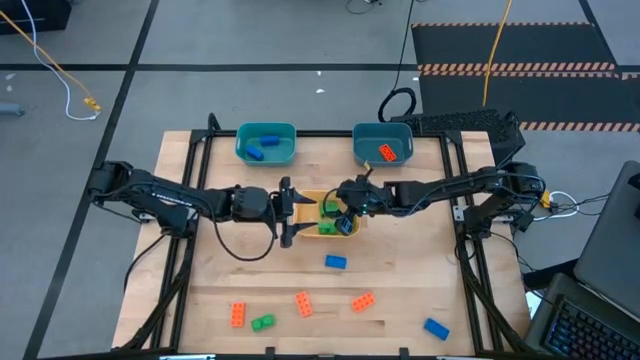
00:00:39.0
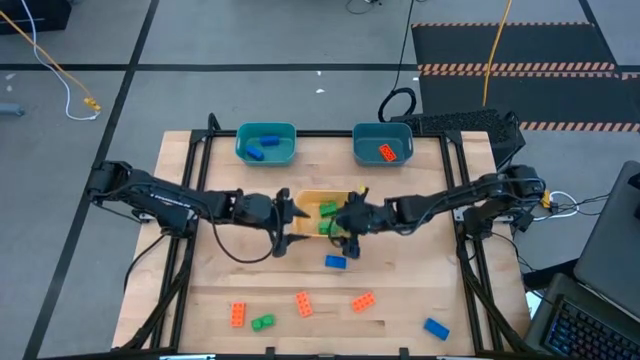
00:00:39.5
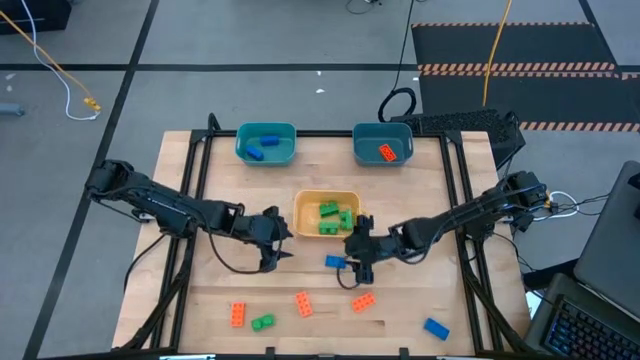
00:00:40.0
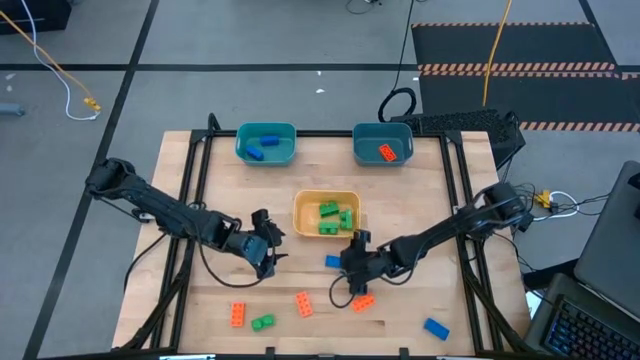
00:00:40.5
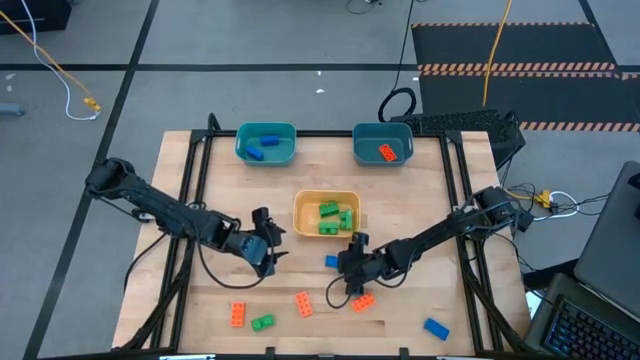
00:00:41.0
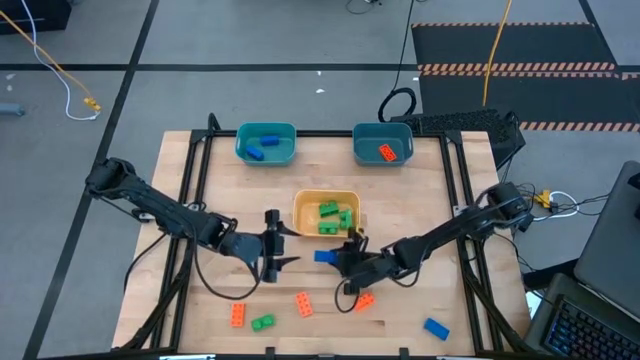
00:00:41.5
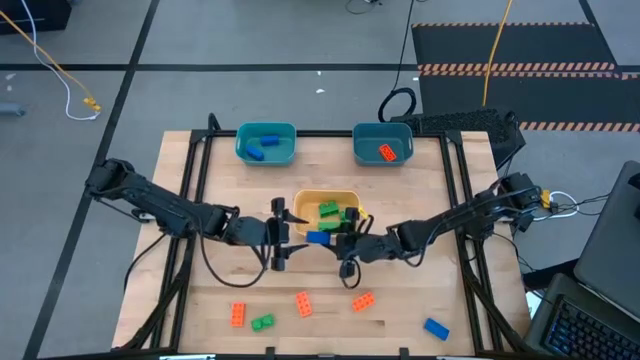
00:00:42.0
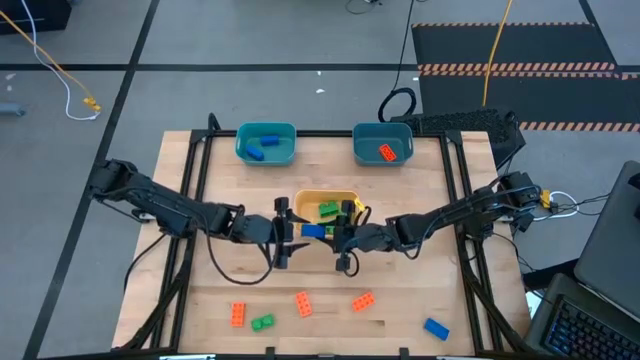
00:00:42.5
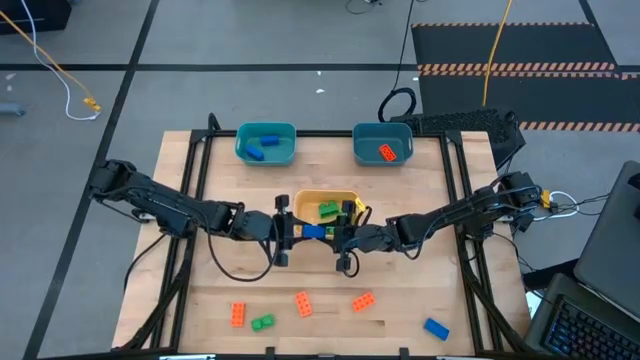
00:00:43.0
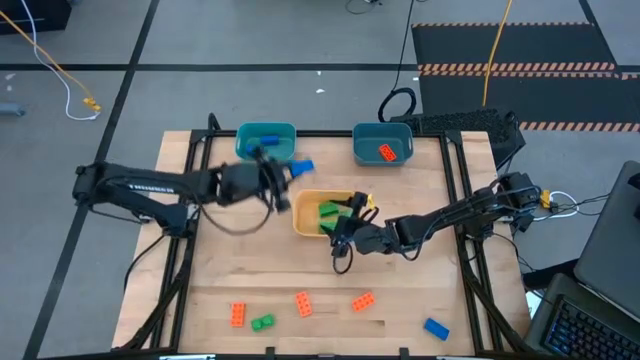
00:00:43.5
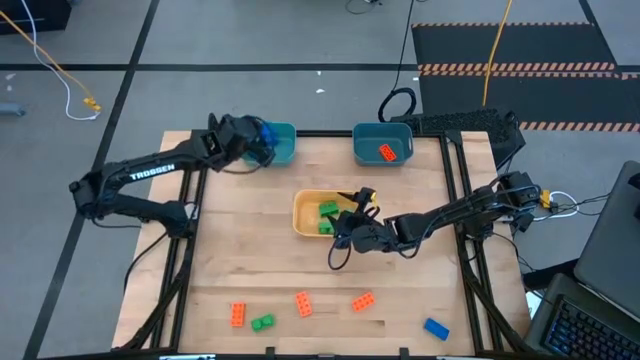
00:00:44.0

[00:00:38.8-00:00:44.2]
Task: Sort & place blocks by color
Put the blue game piece into the green bin

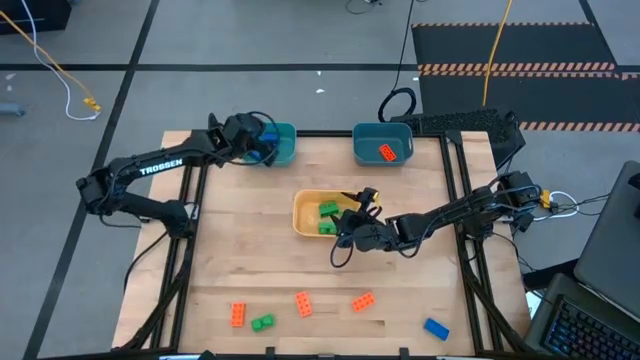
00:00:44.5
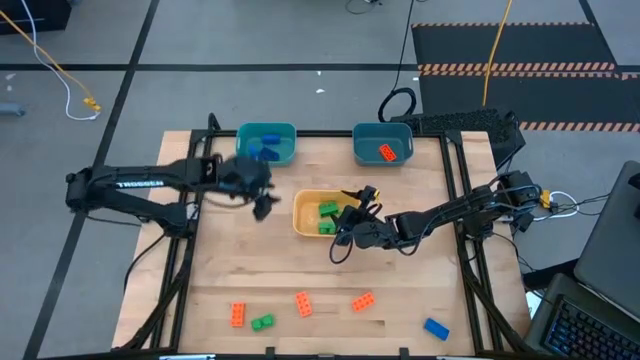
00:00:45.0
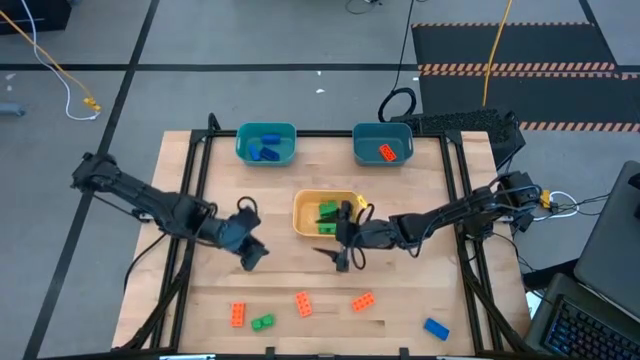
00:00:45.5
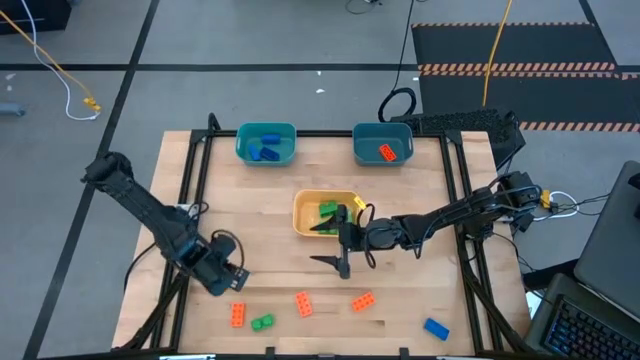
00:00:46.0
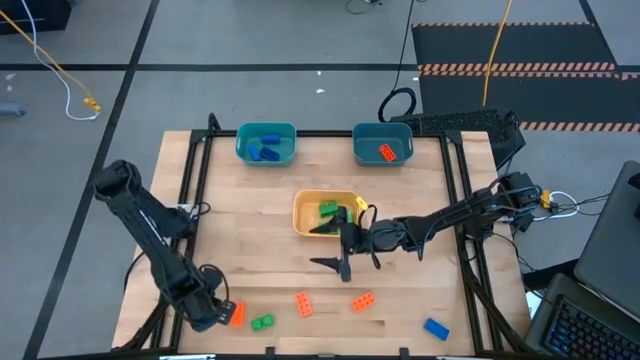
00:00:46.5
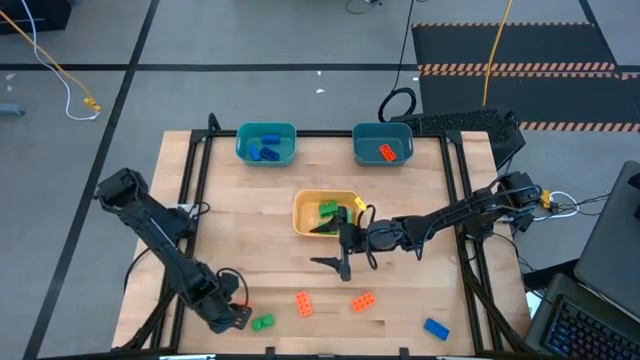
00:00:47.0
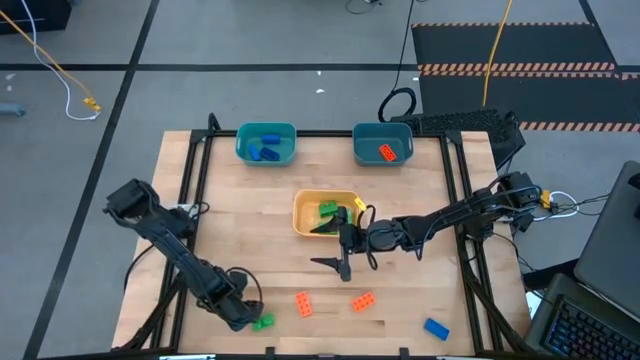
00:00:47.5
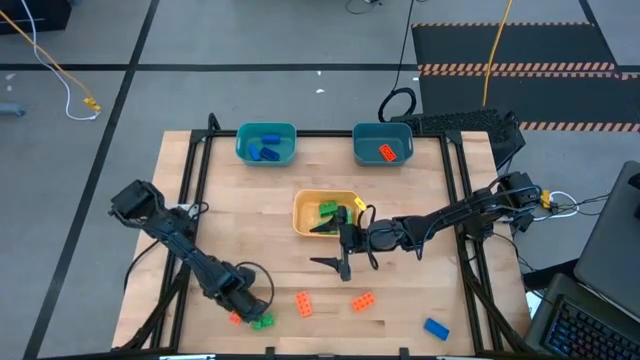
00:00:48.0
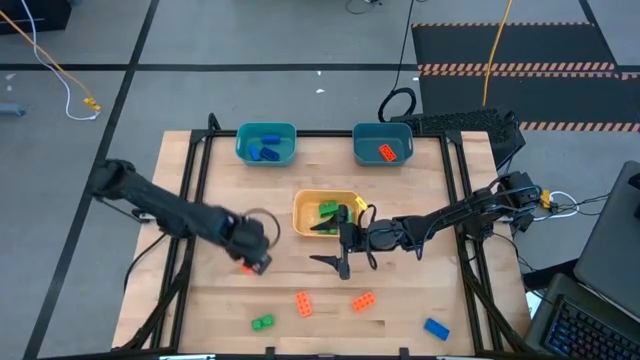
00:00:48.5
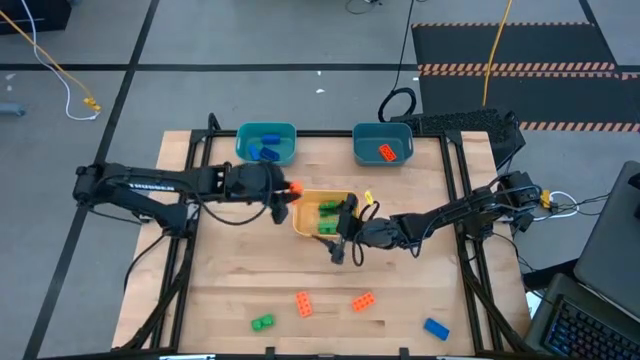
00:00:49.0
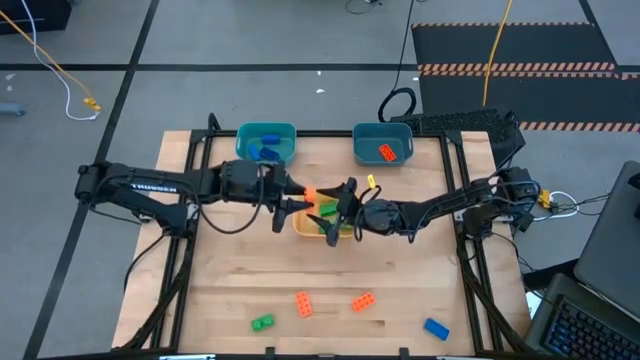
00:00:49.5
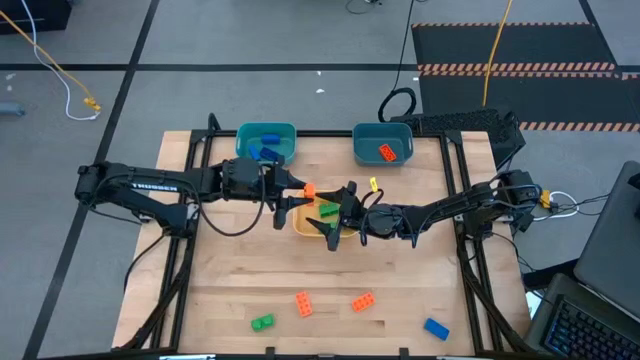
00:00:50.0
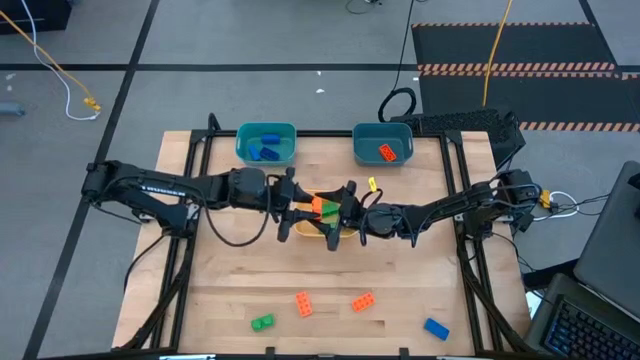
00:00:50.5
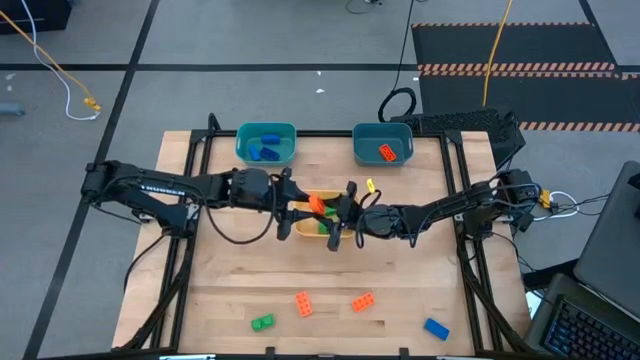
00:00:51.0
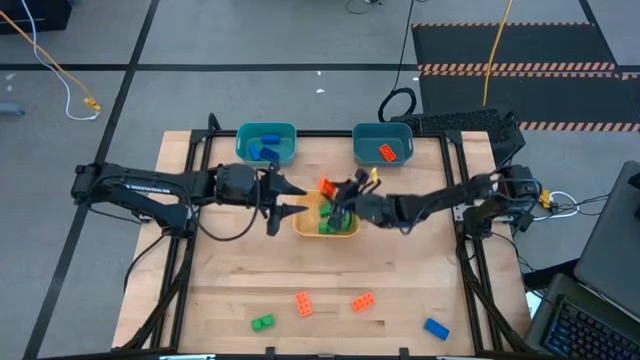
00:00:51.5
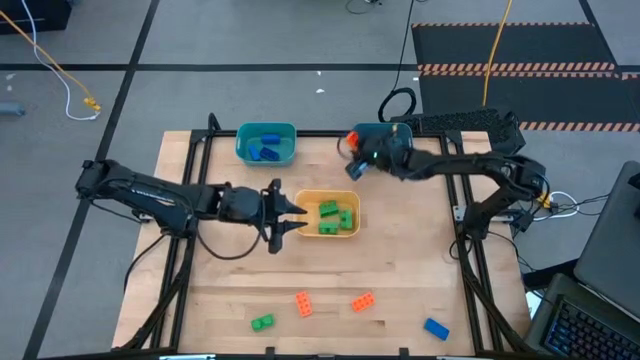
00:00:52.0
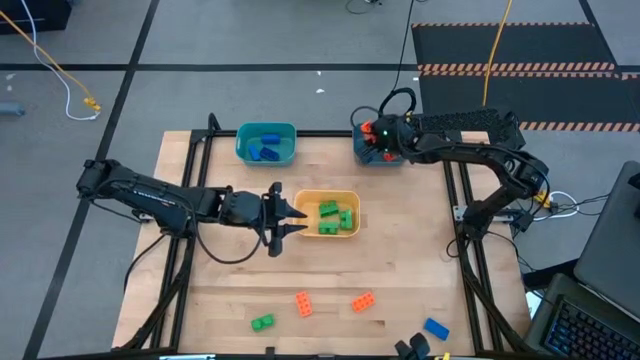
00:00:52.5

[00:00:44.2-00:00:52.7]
Put the orange game piece into the blue bin

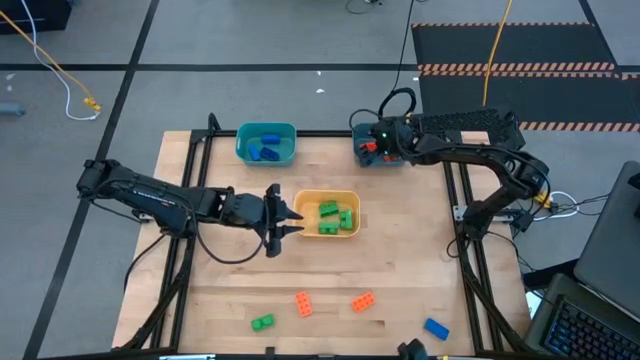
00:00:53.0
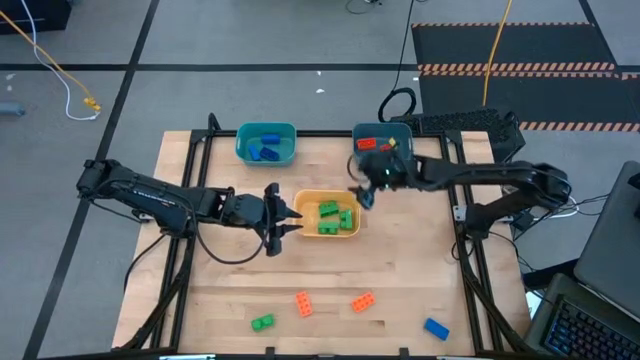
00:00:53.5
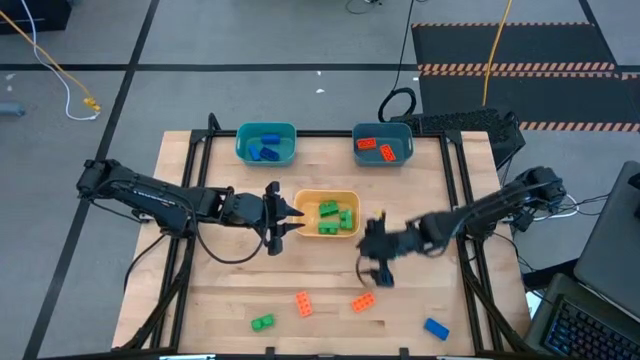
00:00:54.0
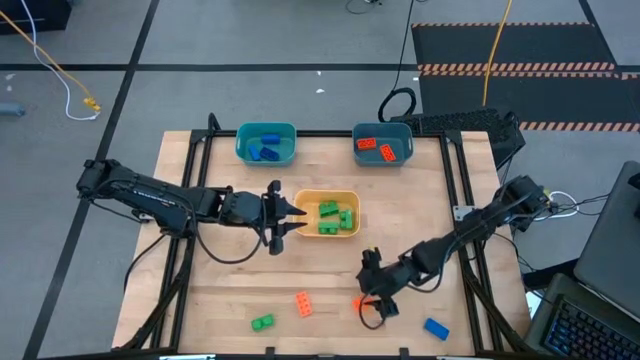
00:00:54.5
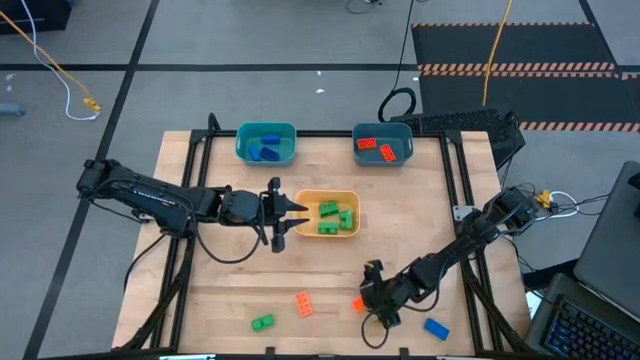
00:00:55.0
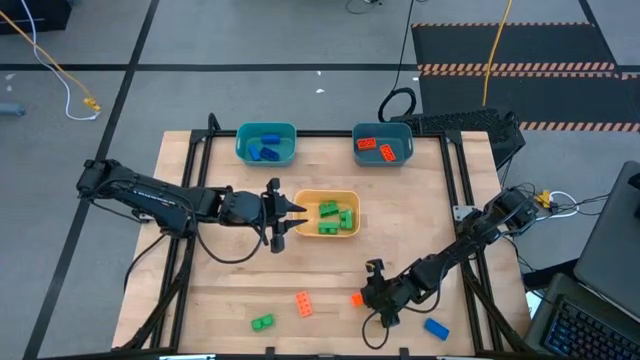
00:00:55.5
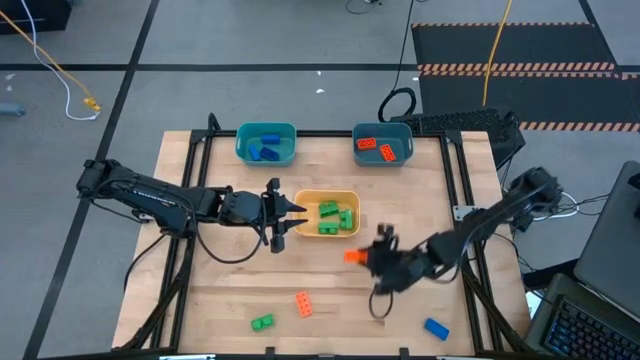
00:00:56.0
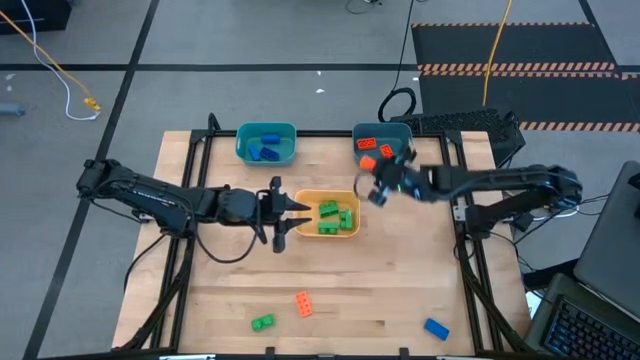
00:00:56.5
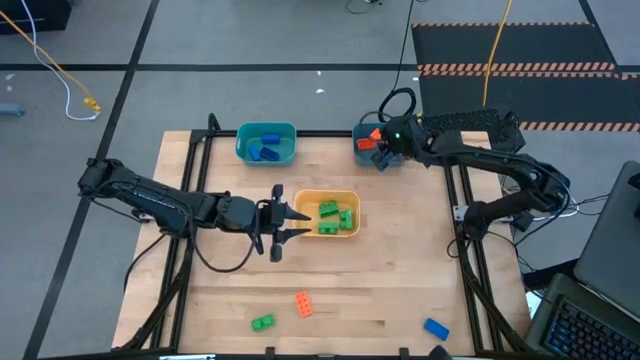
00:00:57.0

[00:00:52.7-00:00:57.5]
Put the orange game piece into the blue bin

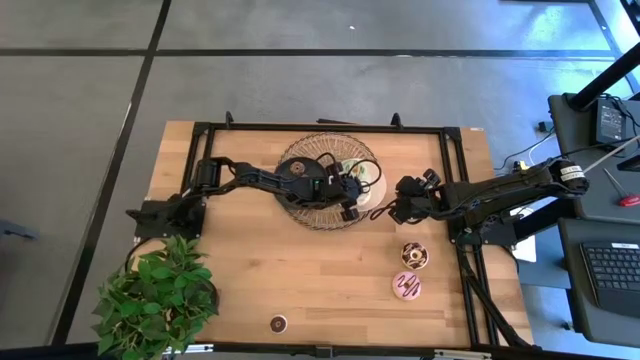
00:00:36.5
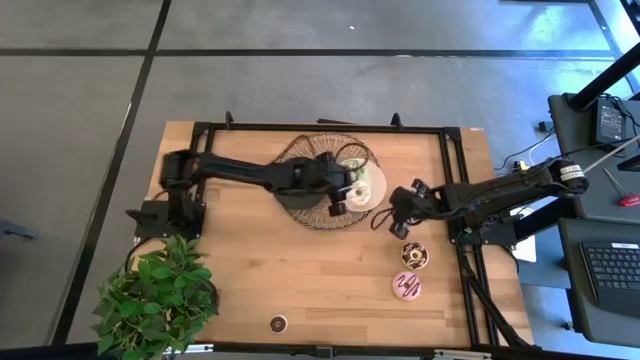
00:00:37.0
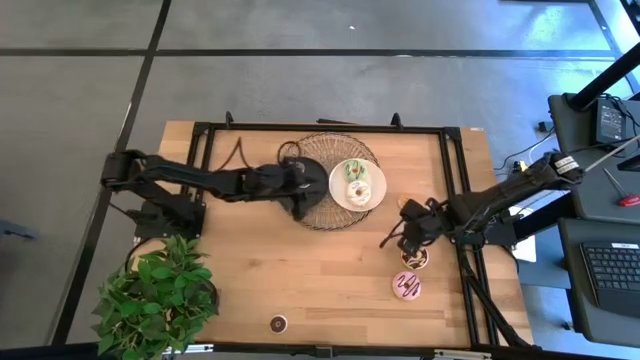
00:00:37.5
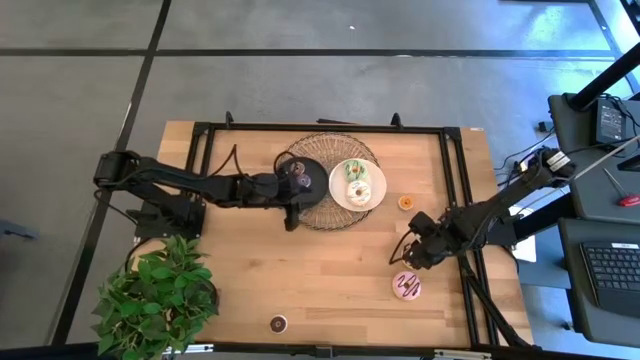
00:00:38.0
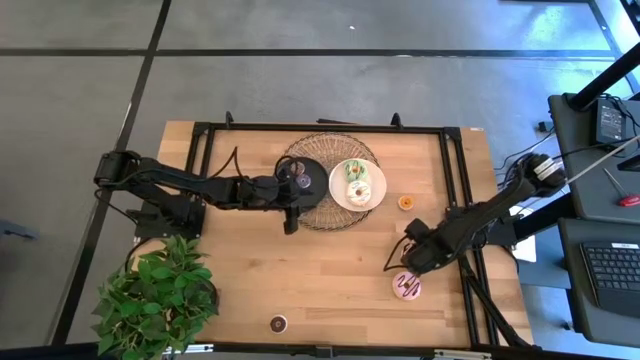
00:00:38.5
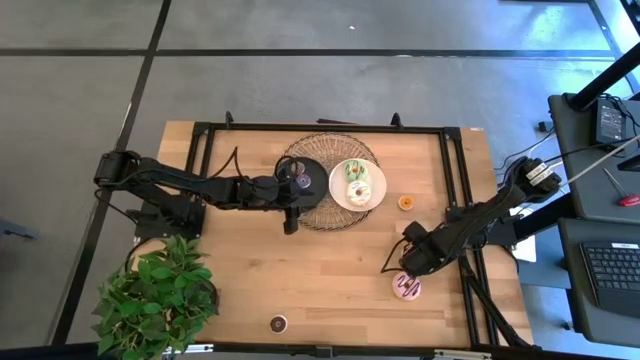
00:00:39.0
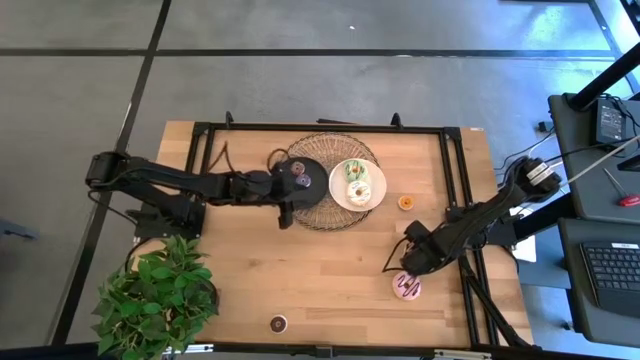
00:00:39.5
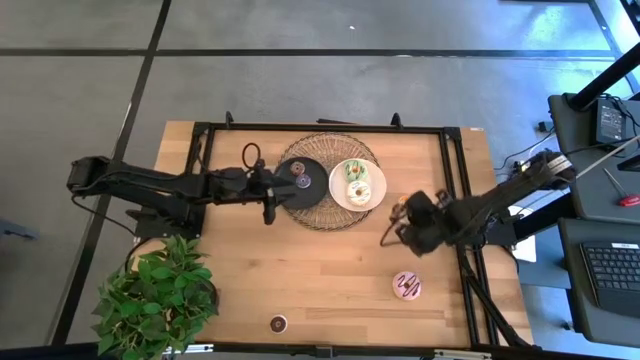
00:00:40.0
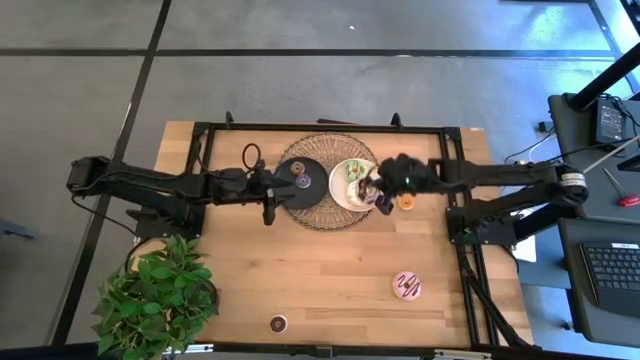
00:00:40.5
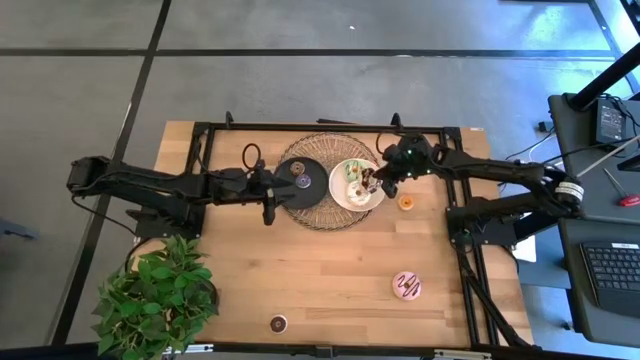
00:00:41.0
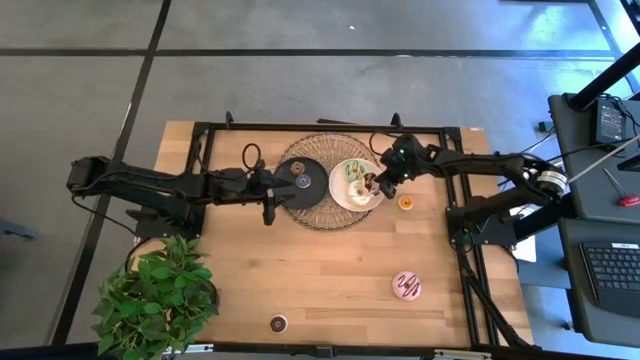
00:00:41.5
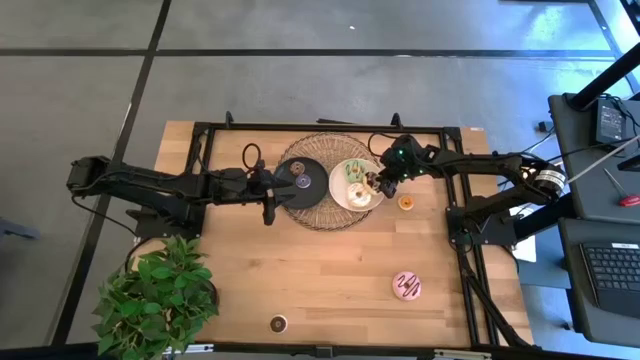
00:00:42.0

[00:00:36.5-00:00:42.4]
Task: Pick & Place donuts
Put the big black donut on the white plate
